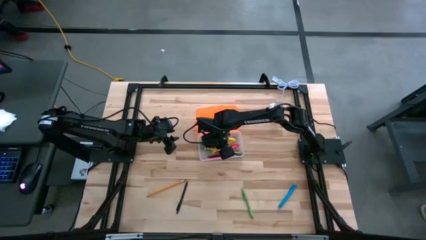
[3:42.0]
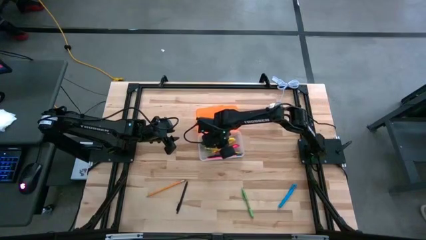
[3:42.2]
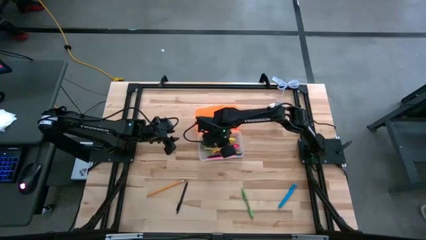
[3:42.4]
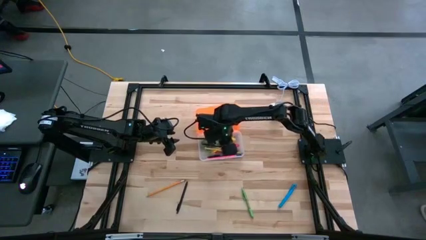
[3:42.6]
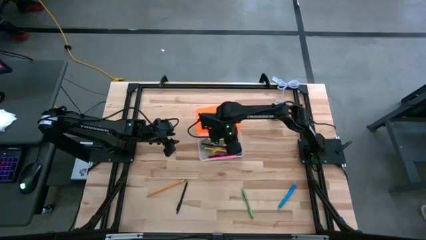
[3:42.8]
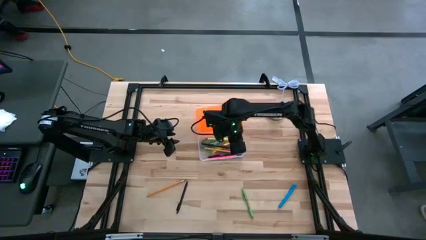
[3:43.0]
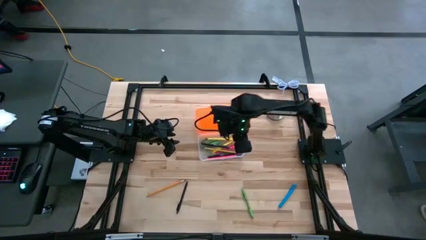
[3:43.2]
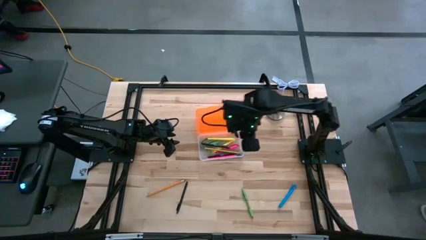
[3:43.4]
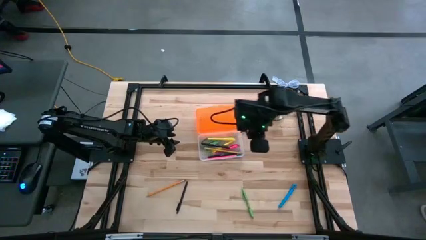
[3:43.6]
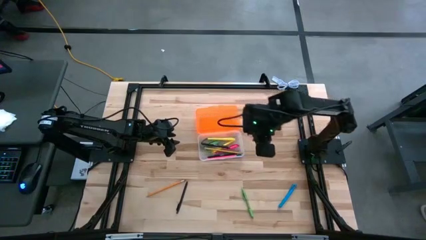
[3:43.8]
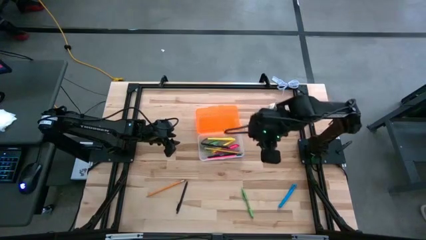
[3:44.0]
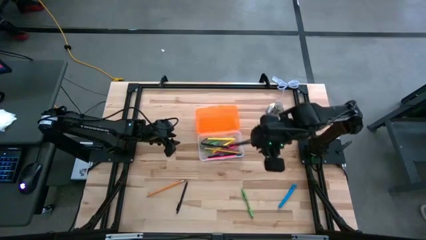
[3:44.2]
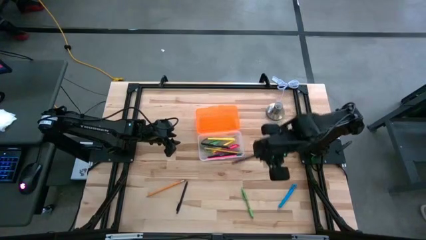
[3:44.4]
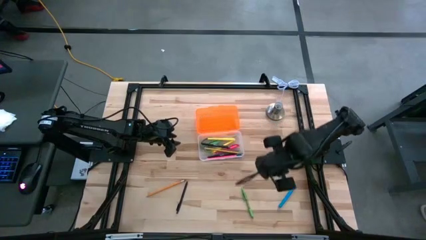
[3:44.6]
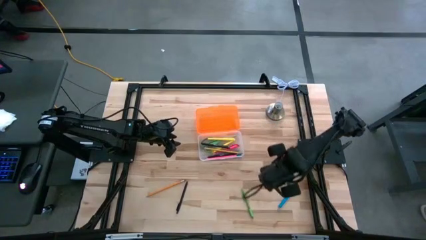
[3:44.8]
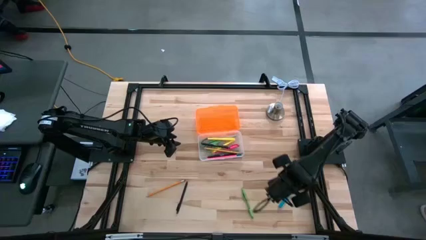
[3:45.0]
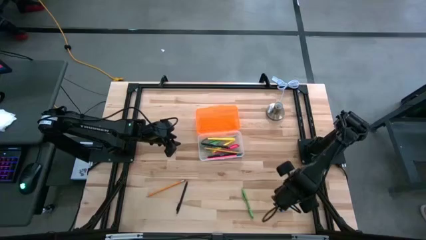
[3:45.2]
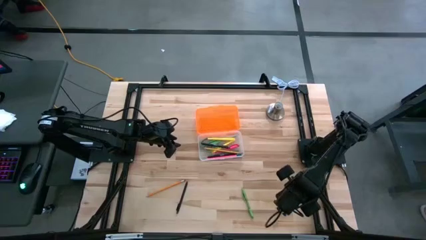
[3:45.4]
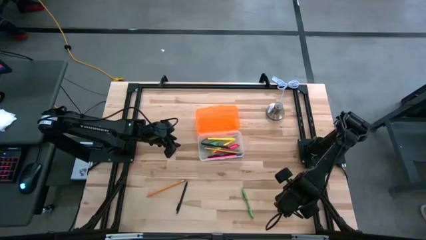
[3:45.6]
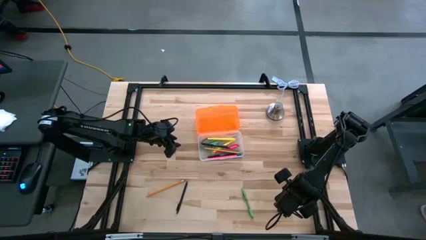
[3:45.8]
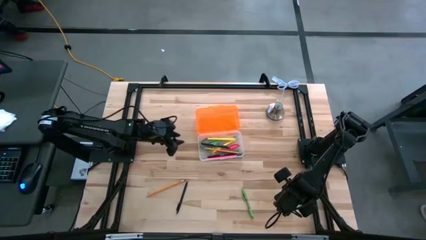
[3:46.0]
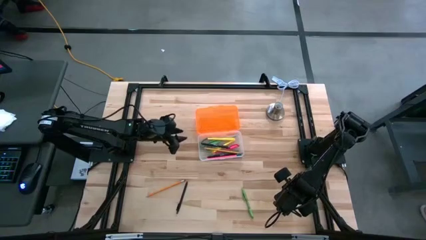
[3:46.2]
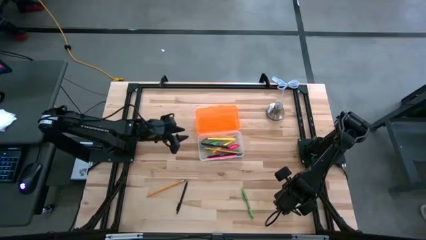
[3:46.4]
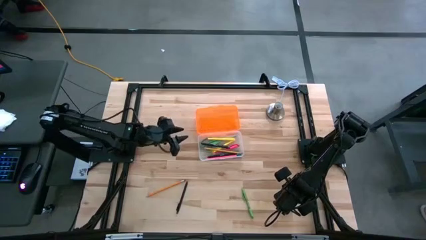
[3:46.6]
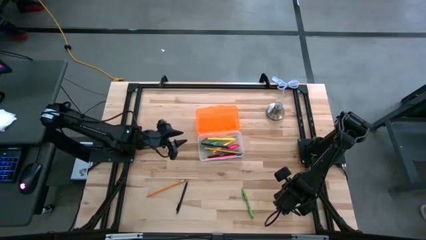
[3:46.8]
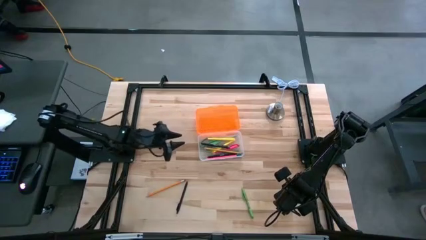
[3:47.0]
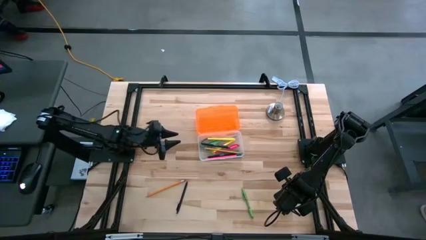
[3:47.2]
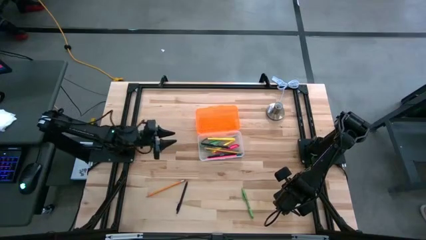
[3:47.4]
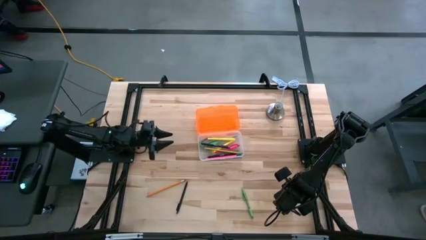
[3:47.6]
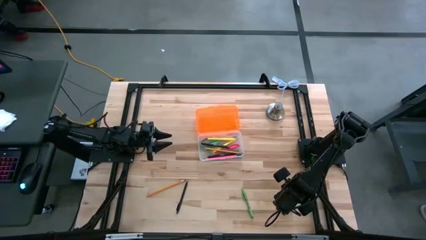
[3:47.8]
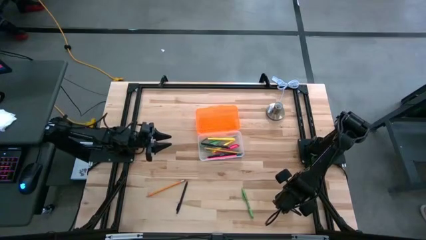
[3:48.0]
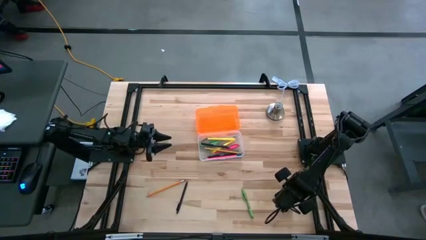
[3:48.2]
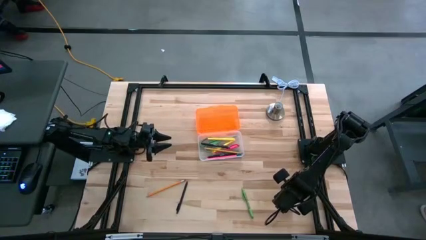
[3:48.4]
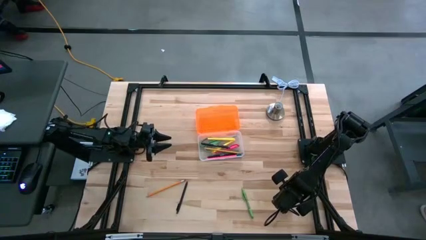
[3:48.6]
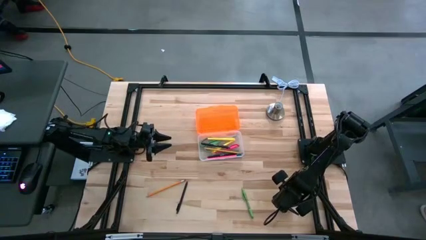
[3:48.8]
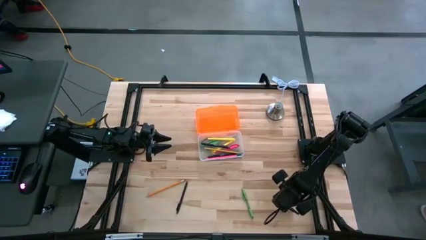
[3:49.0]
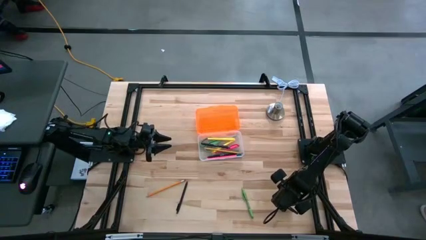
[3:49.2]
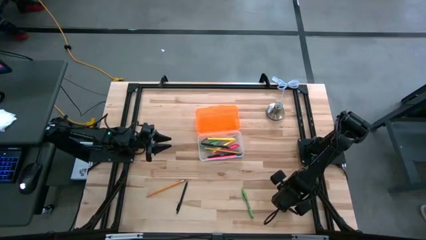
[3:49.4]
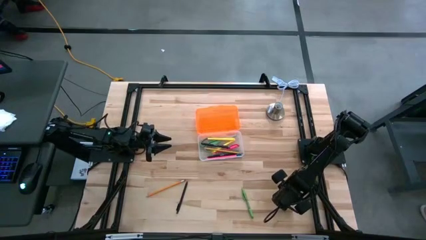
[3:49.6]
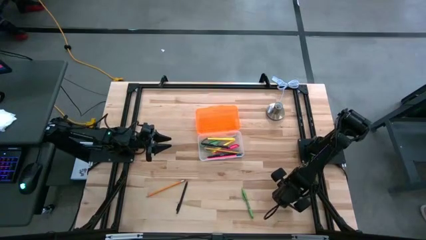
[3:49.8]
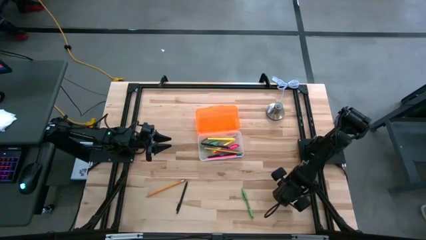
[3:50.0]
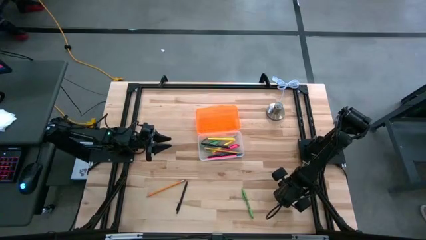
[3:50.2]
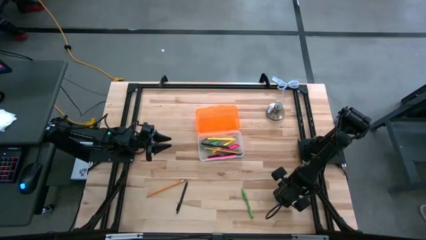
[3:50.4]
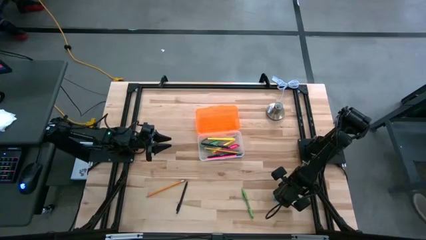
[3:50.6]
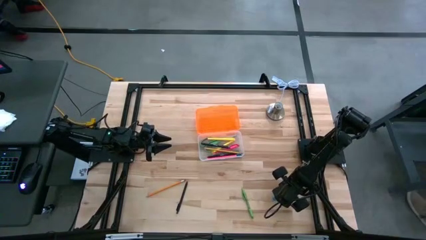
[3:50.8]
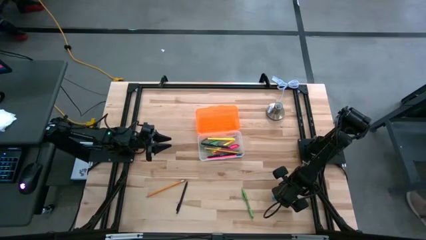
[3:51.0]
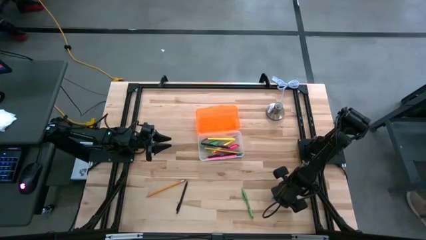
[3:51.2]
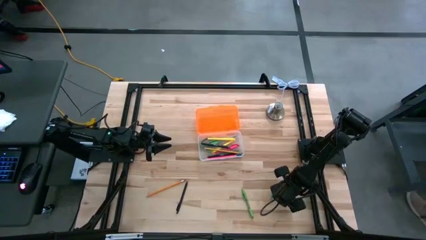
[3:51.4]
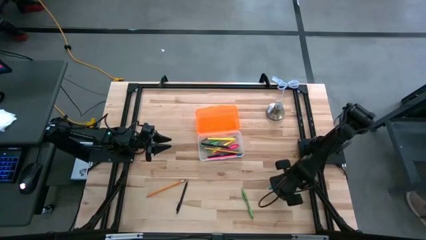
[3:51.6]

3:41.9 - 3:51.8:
Task: Pick & place school supplies into a supply box
Put the blue pen into the container

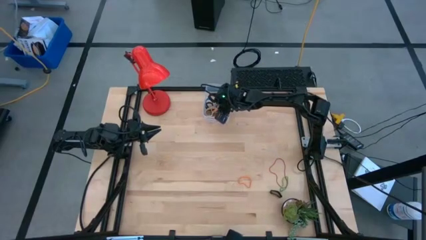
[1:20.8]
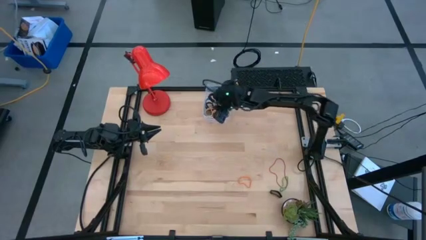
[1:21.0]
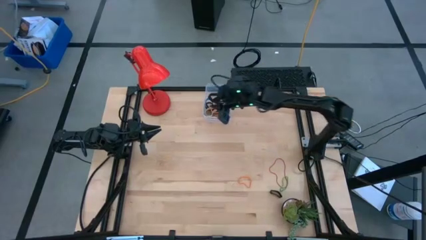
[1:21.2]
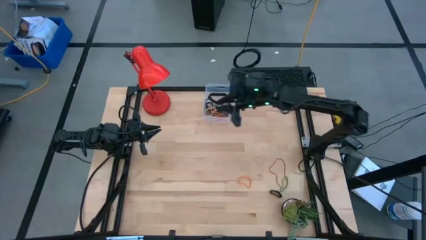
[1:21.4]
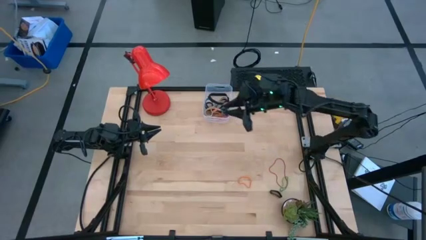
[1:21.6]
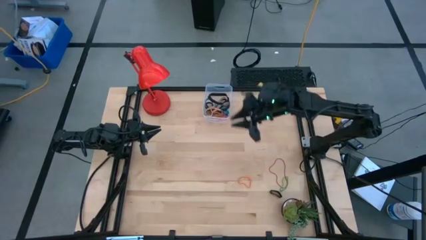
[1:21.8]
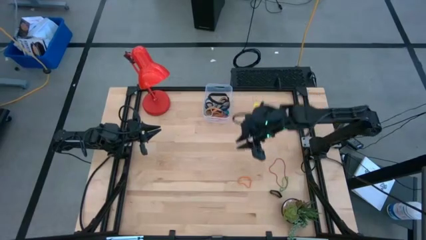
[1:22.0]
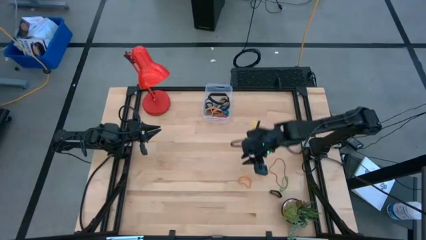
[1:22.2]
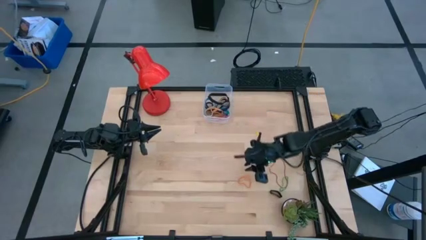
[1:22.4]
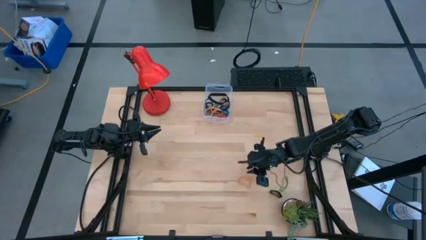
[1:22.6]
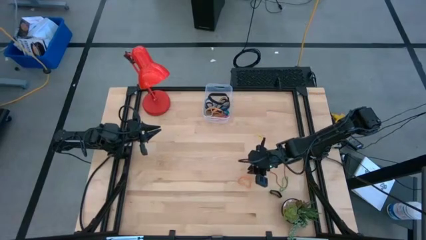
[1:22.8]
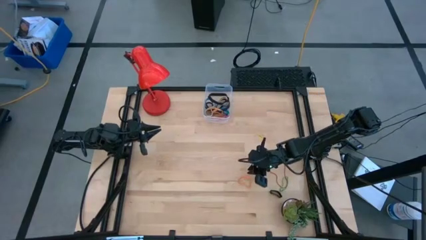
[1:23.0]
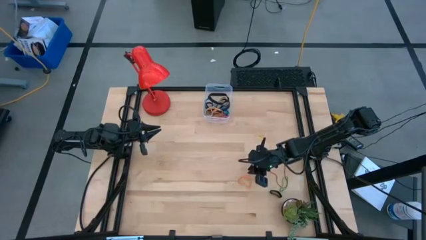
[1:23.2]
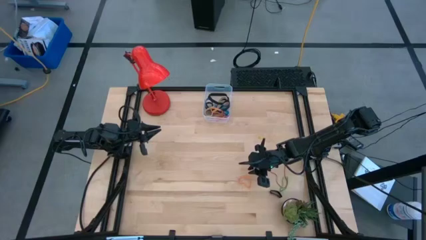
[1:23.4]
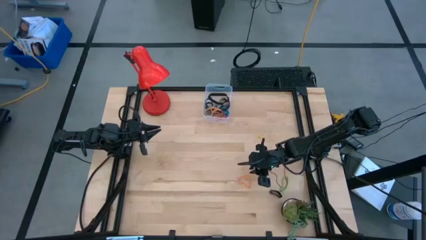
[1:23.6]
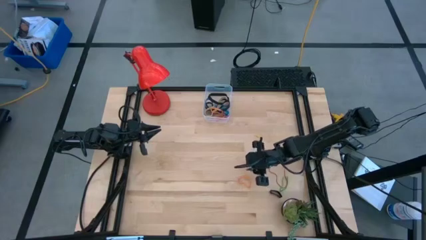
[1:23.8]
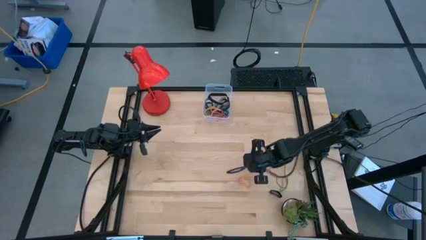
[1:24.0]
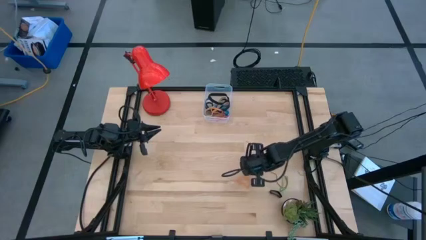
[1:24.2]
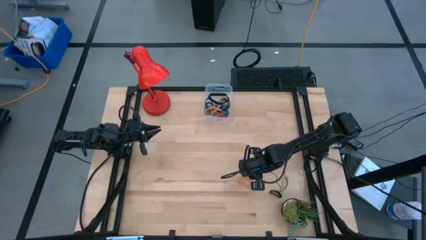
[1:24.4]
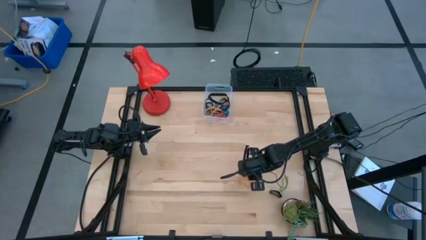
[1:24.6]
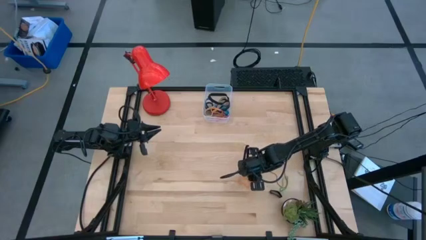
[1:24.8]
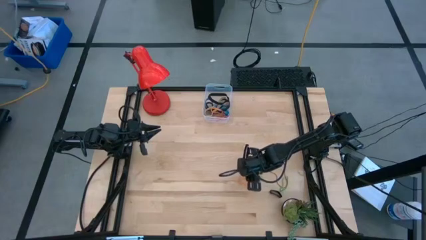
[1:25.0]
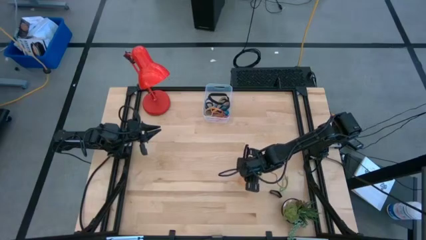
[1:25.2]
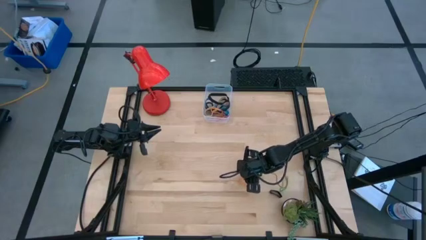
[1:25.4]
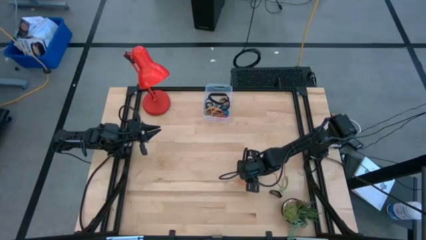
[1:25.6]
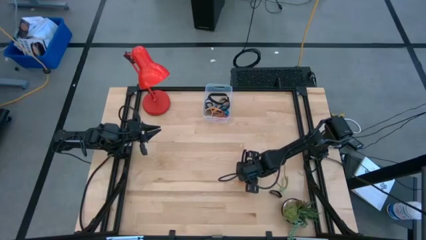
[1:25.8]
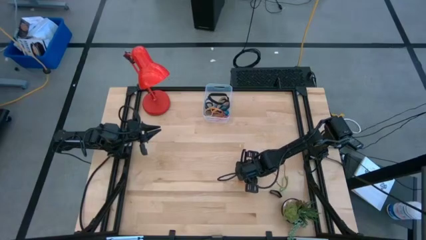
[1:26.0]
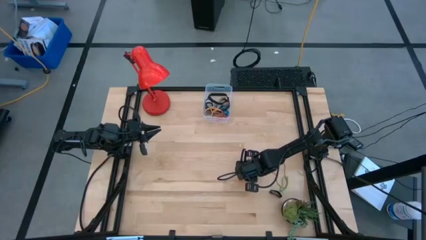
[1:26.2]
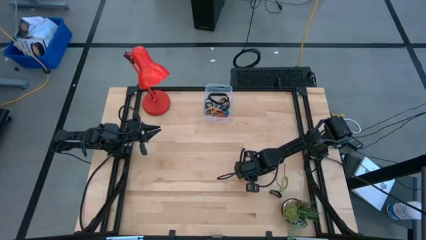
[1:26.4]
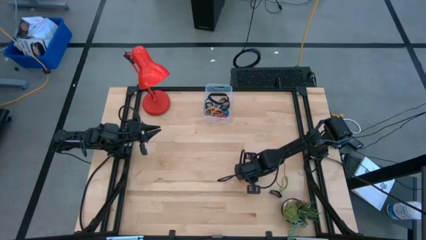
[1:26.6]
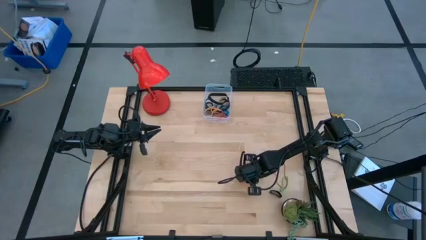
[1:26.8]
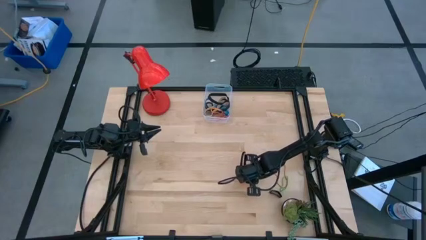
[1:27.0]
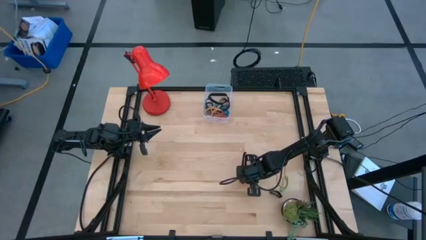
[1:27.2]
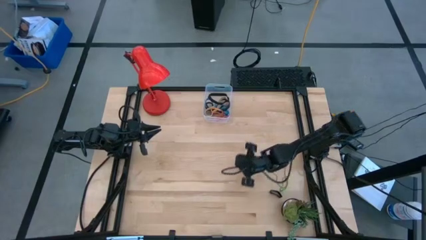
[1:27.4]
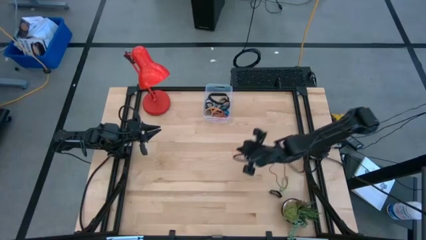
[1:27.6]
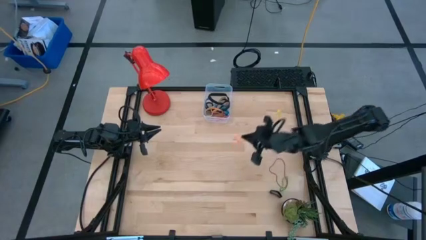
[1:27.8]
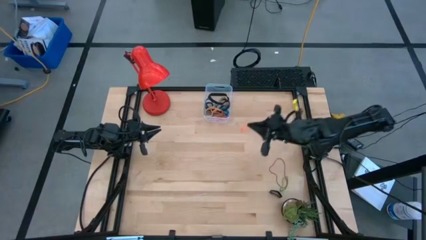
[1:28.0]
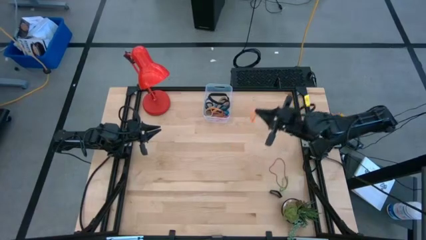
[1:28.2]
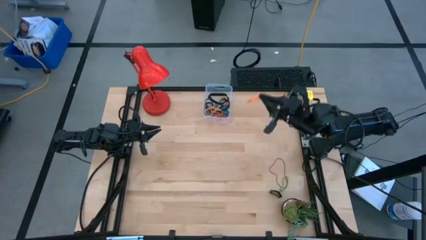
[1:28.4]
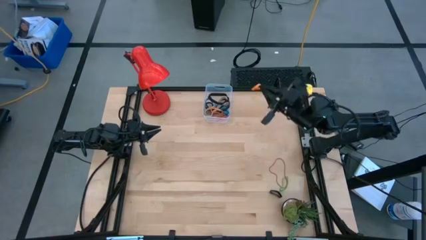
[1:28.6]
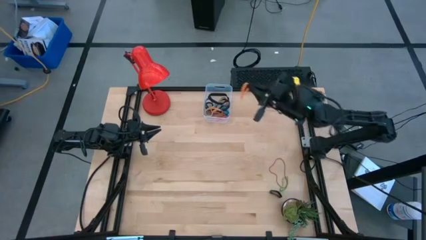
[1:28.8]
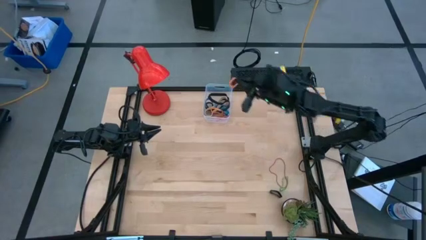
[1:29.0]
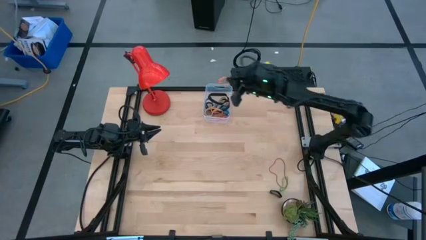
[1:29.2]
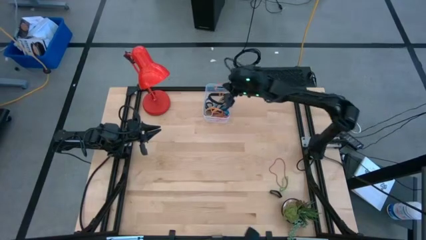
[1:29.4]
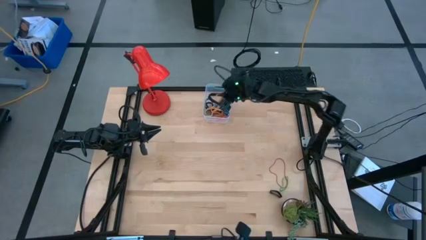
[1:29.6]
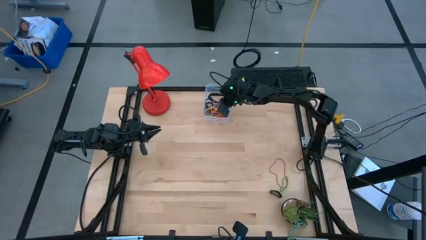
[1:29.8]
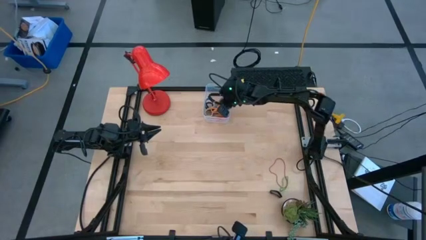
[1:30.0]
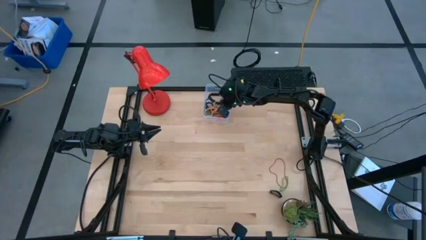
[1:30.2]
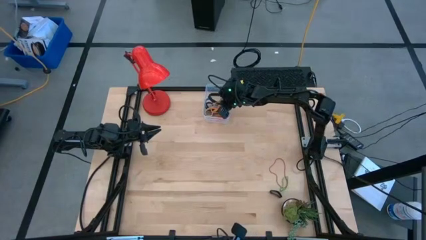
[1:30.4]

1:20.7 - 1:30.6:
Task: Pick and place rubber bands into bin
Put the orange rubber band into the transparent bin
